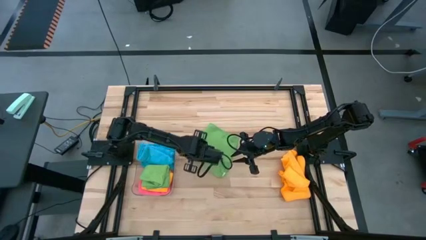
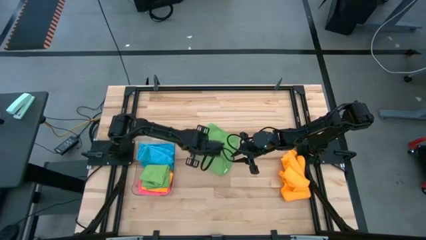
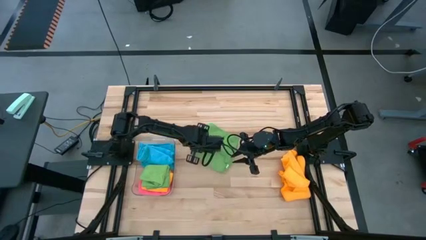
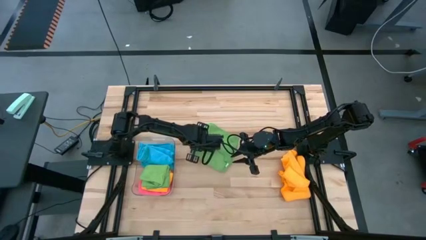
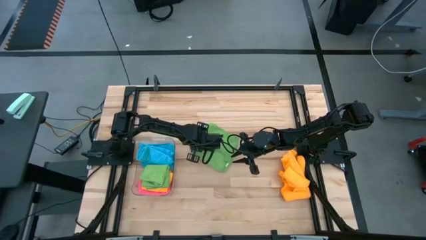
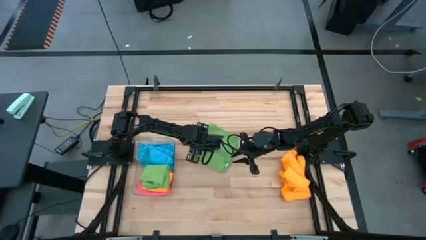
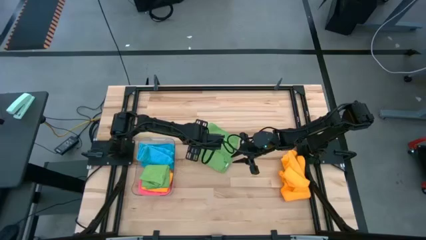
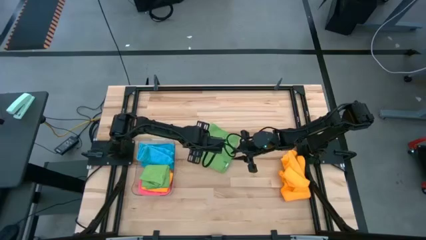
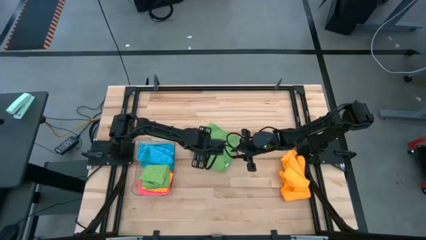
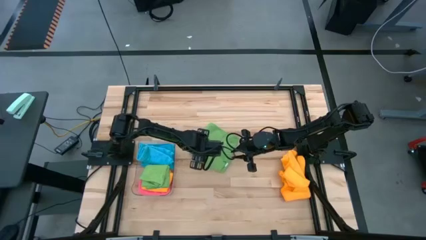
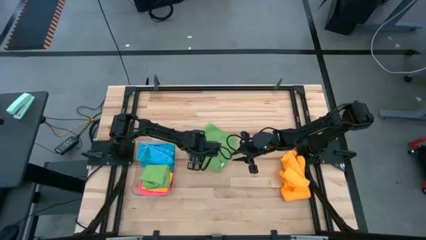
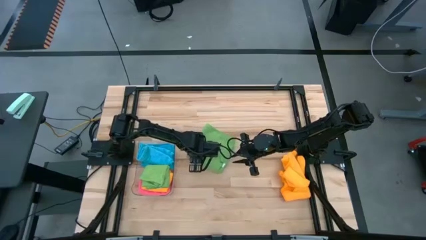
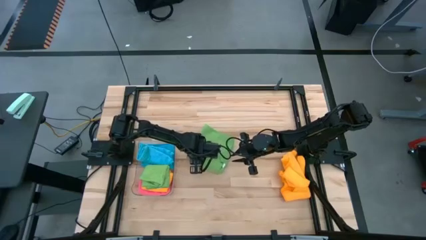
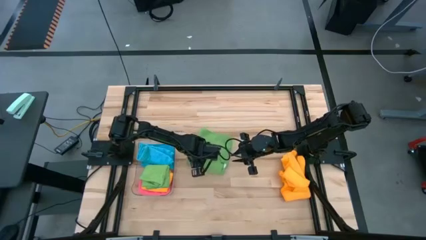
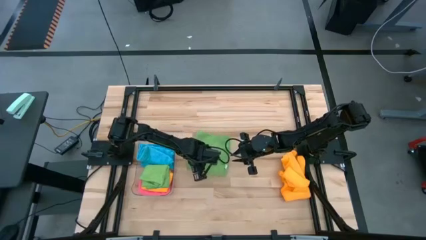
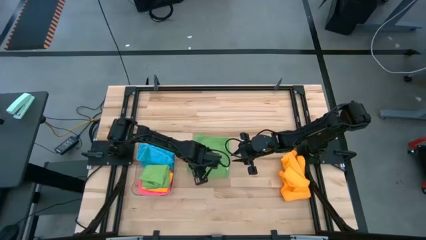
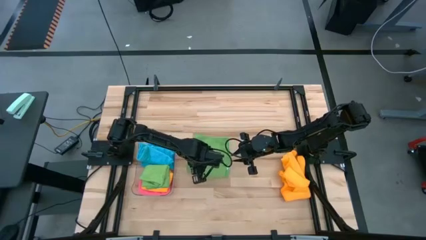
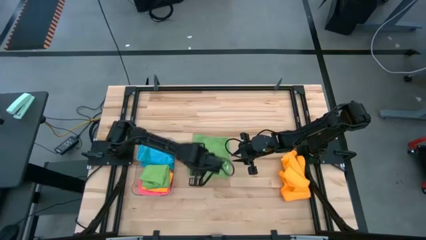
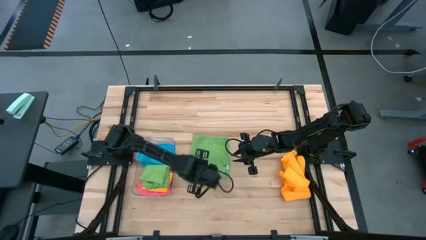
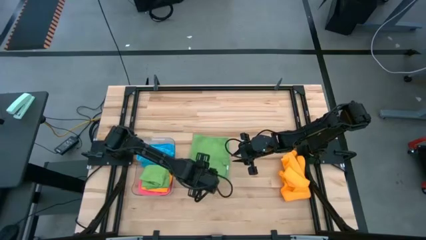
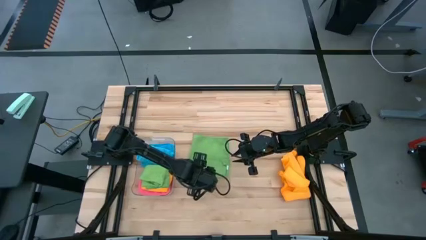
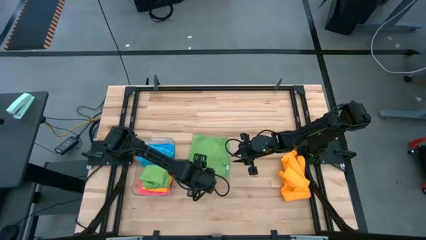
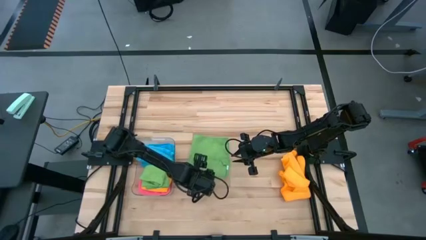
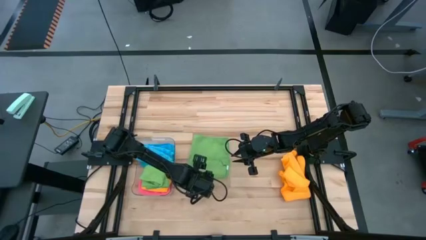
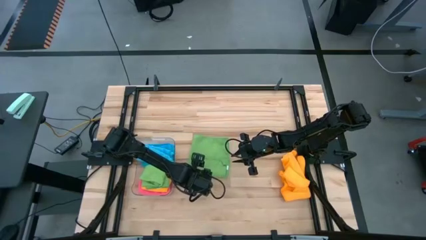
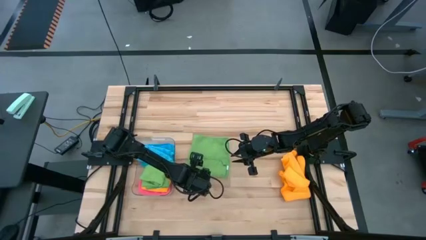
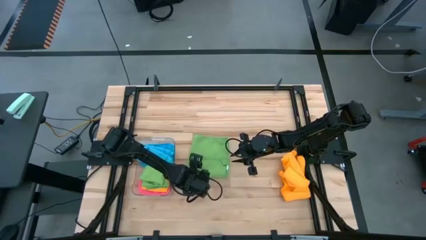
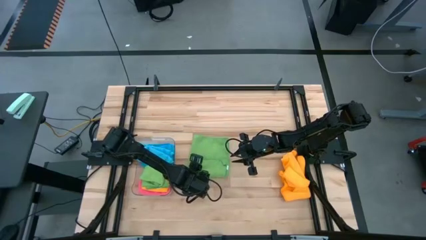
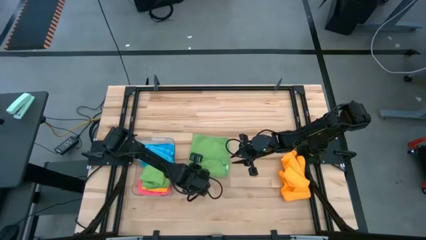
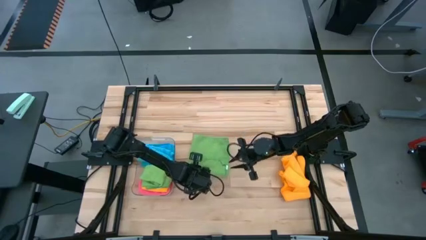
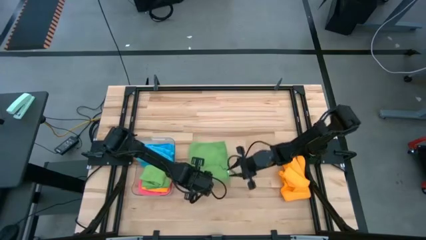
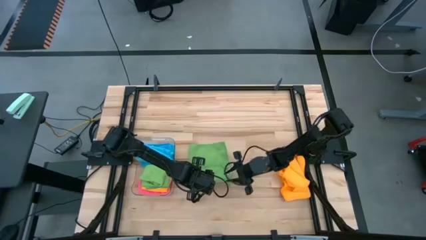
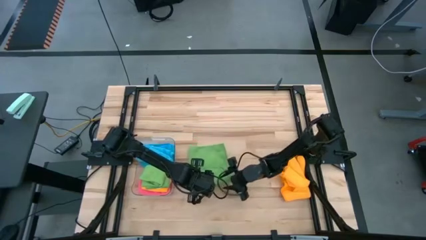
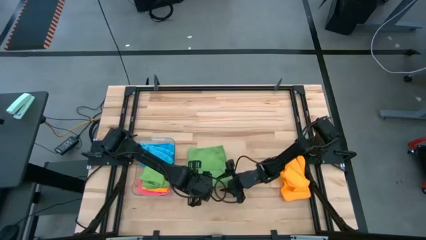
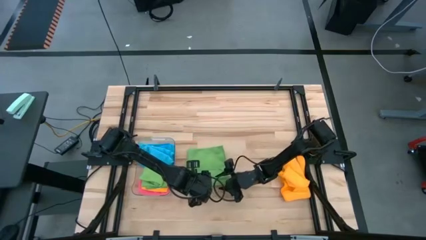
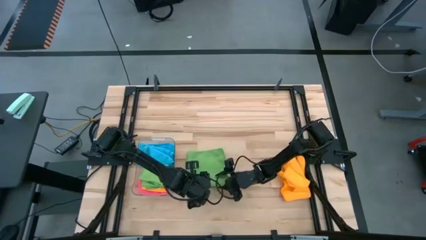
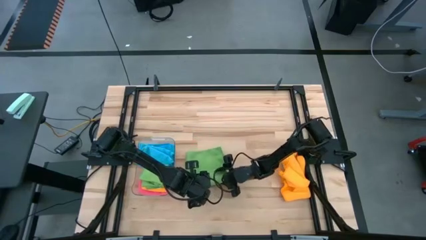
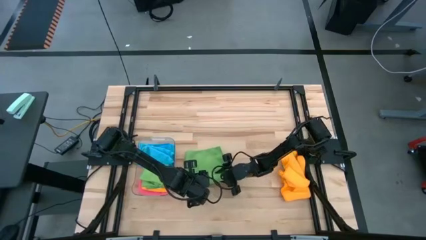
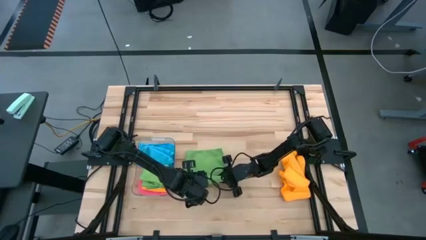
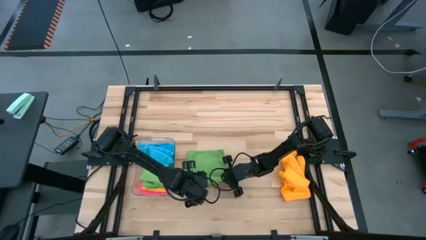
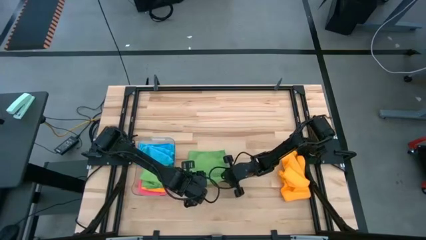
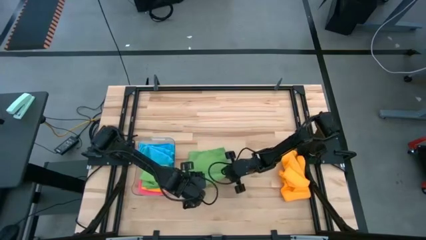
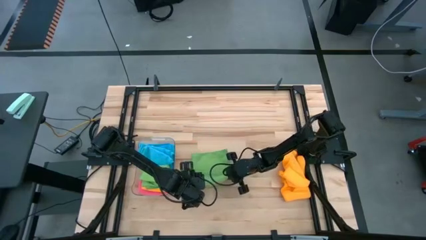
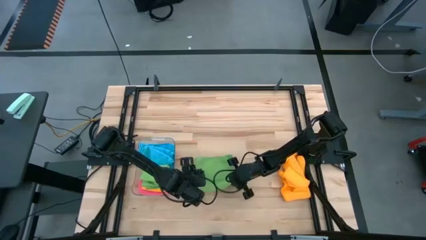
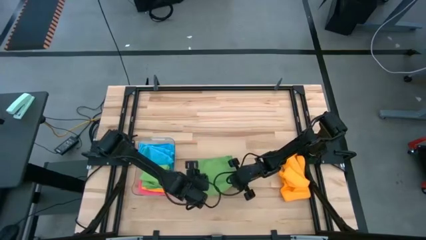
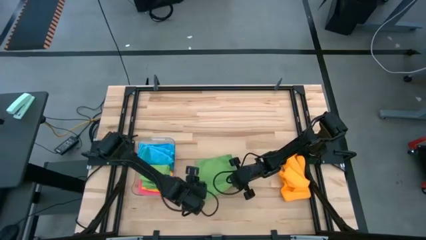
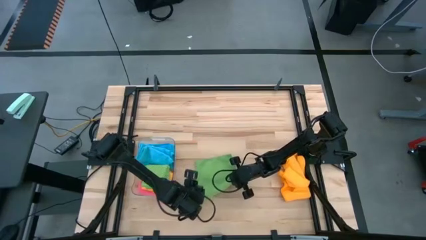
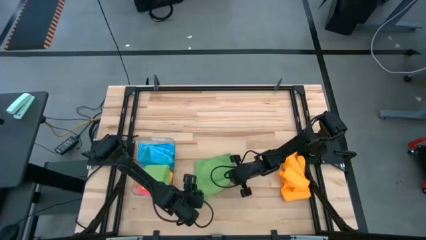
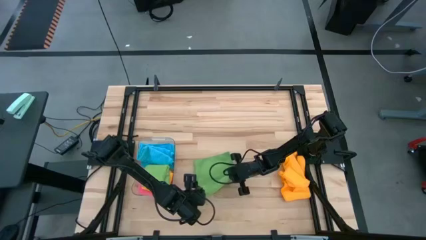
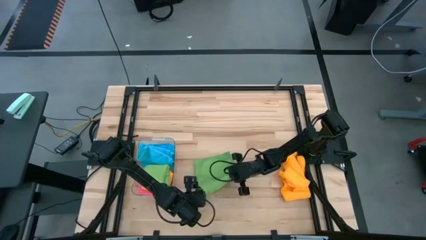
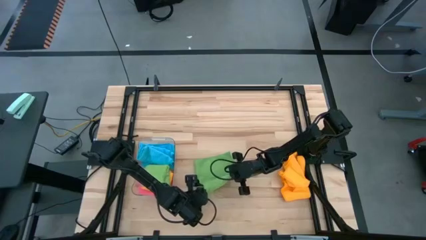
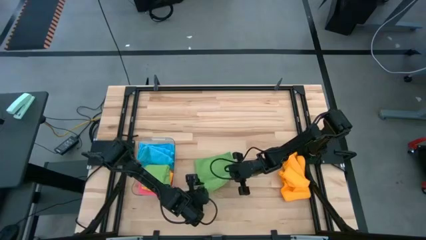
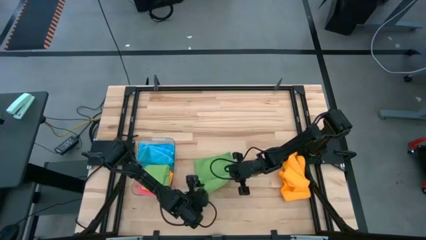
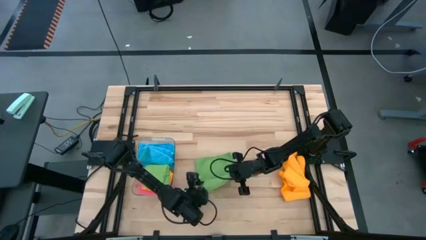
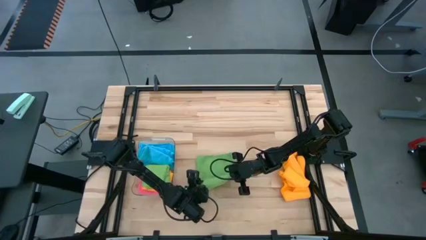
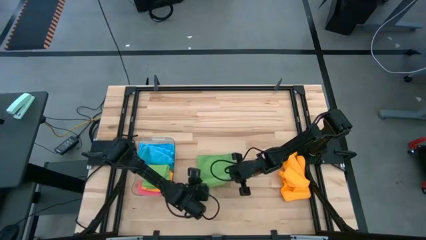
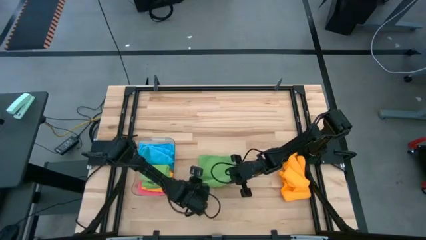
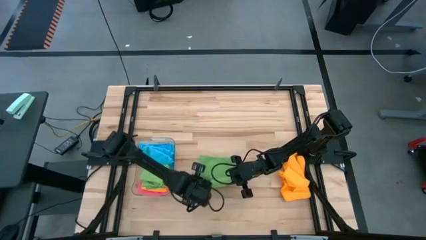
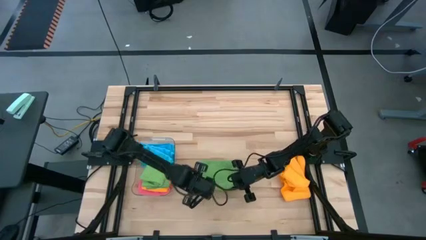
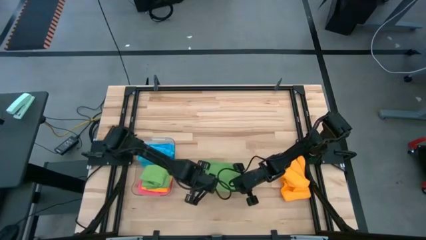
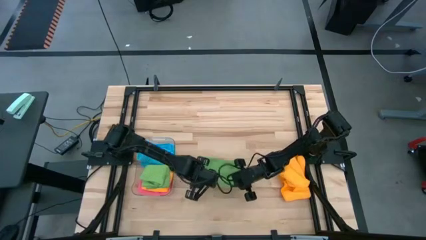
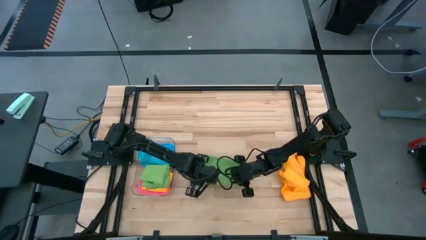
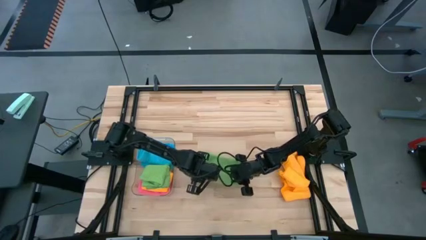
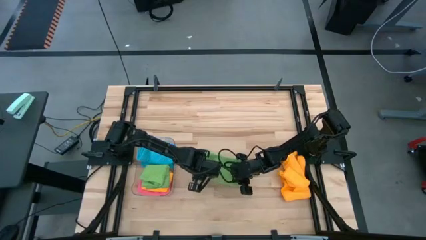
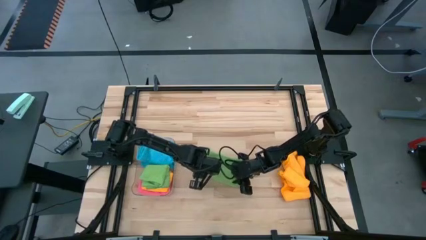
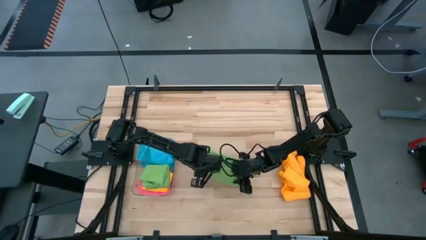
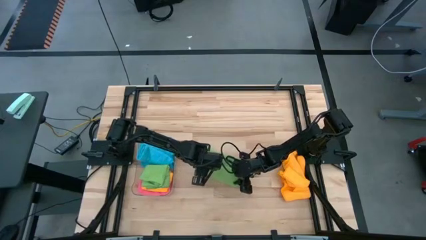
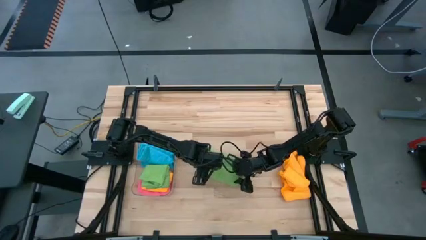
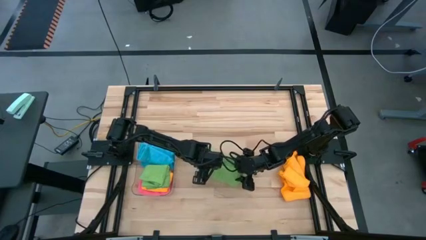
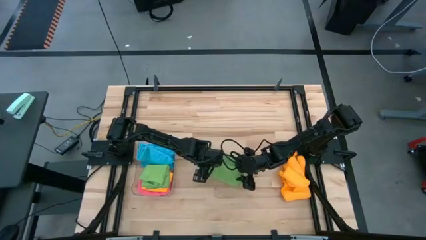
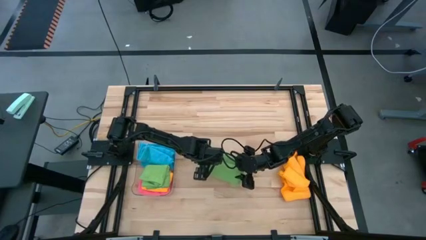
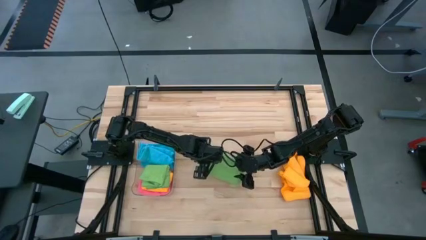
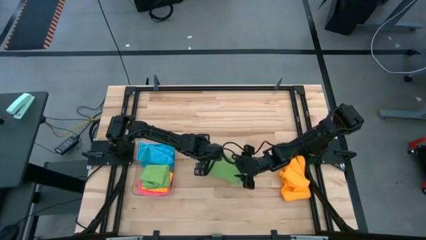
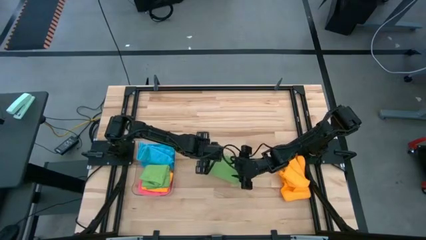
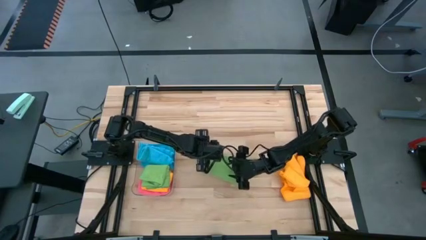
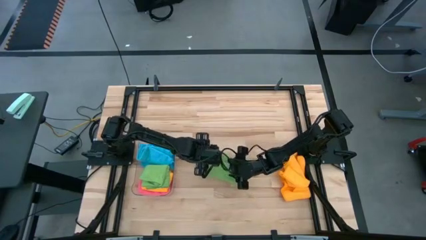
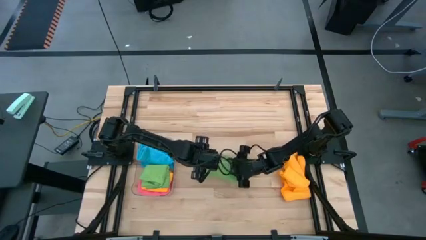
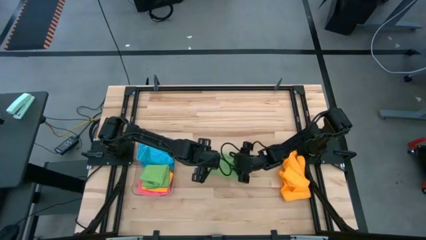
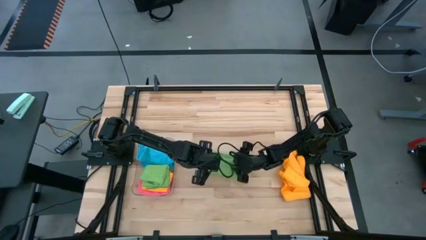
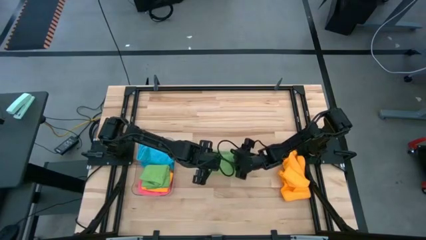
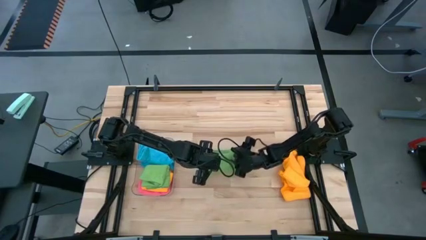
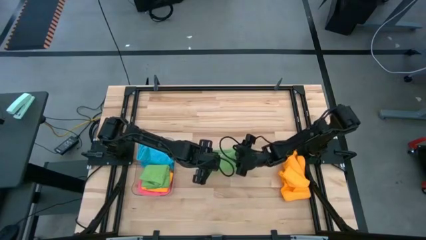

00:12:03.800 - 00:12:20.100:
Task: Fold microfiber towels
Fold the green microfiber cloth
